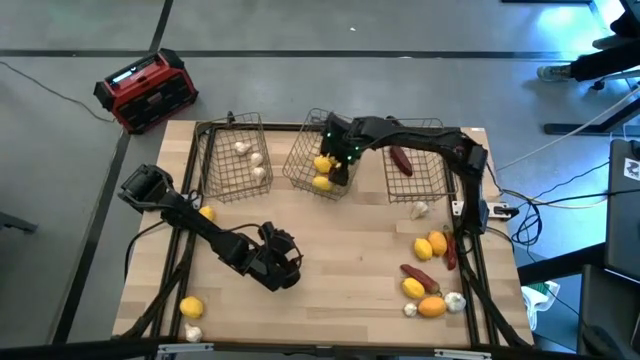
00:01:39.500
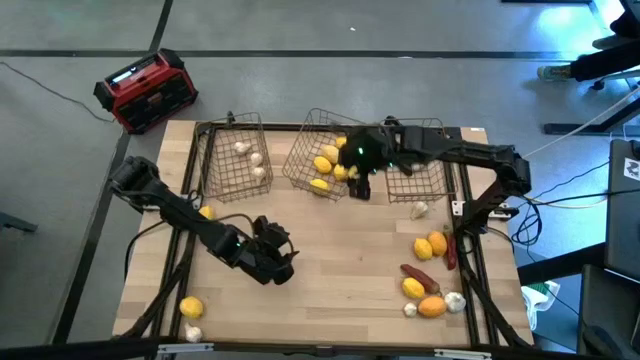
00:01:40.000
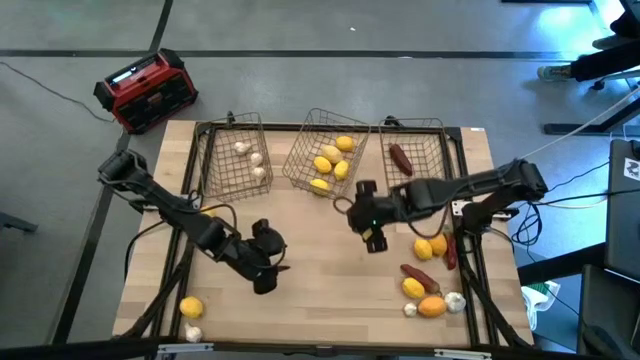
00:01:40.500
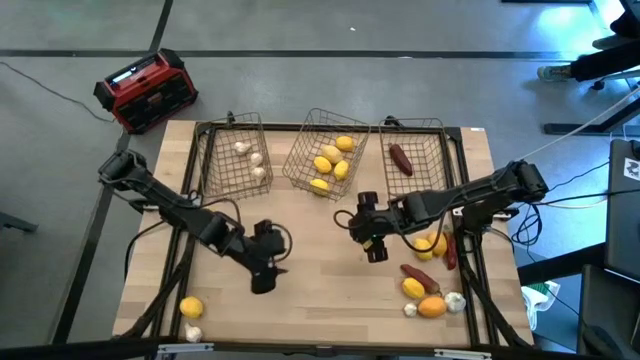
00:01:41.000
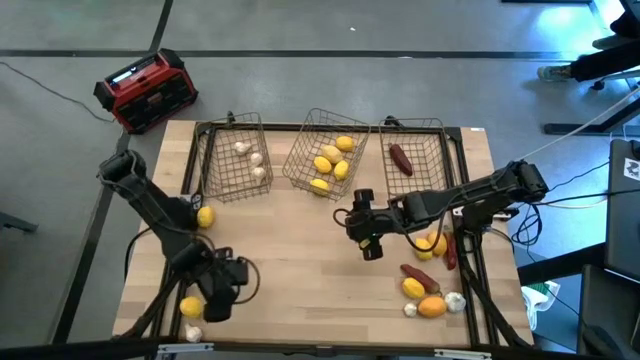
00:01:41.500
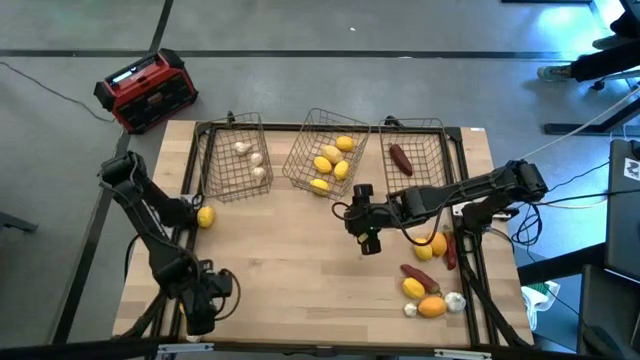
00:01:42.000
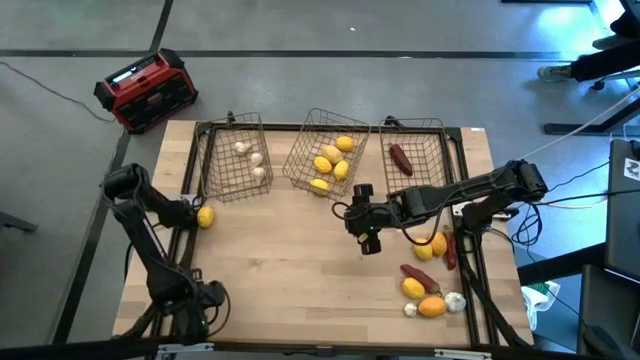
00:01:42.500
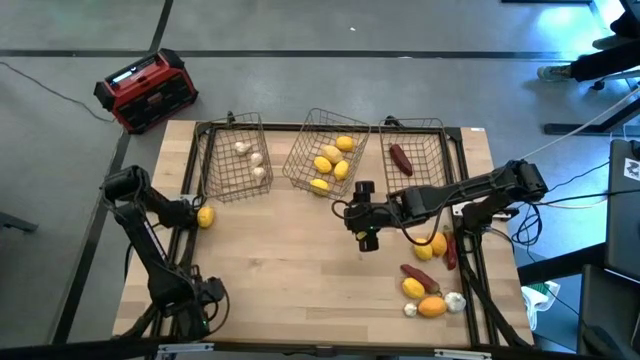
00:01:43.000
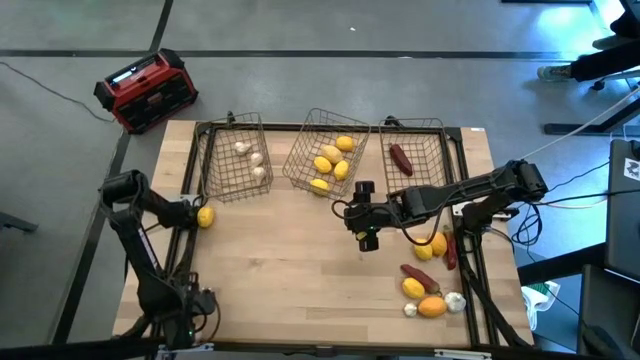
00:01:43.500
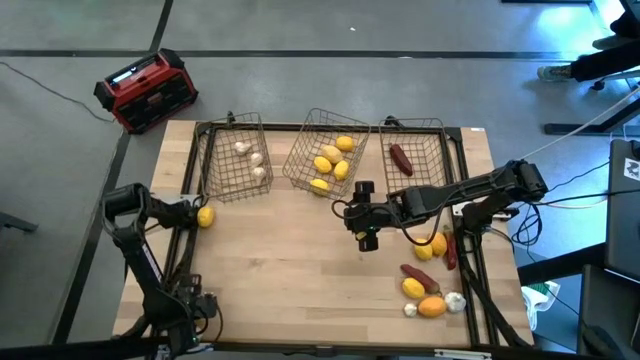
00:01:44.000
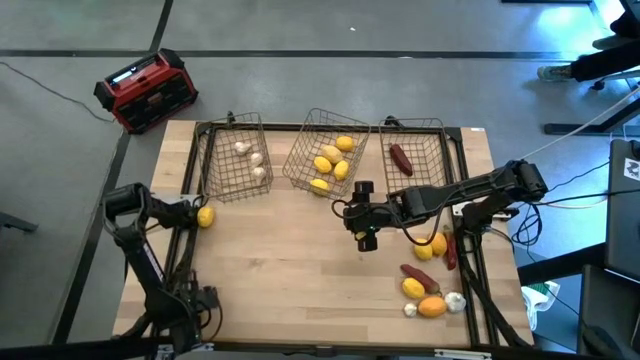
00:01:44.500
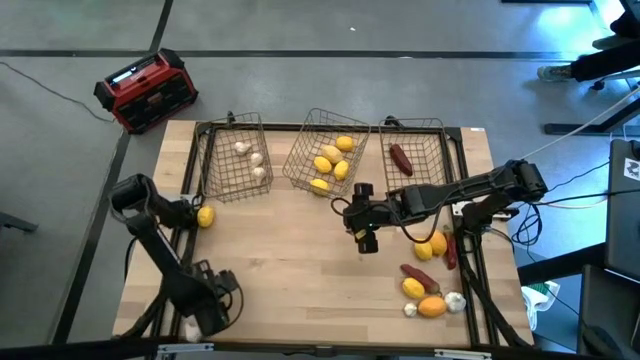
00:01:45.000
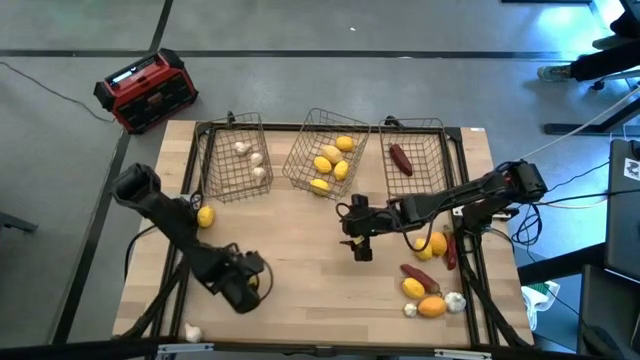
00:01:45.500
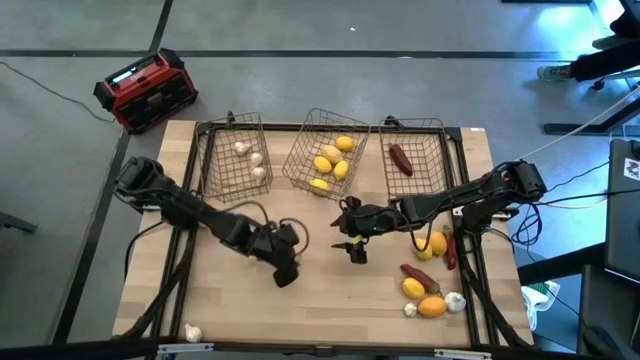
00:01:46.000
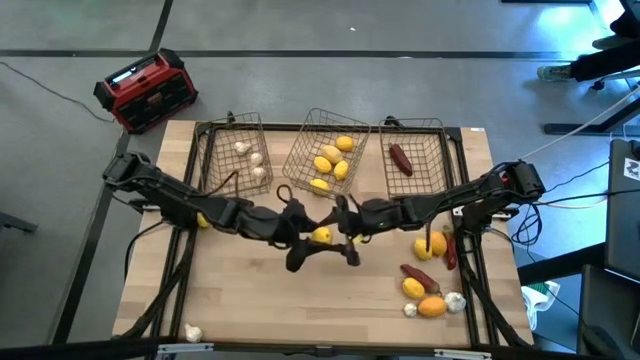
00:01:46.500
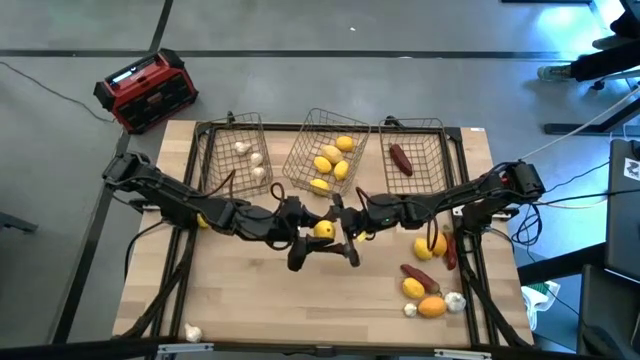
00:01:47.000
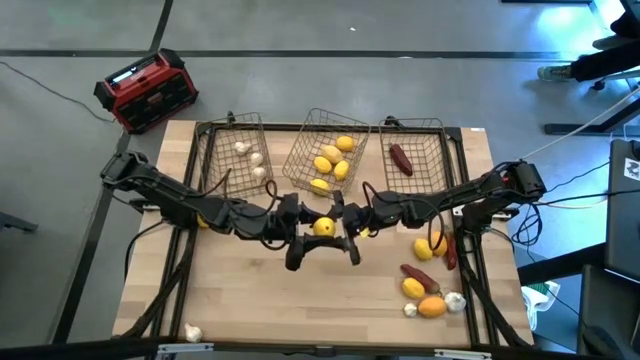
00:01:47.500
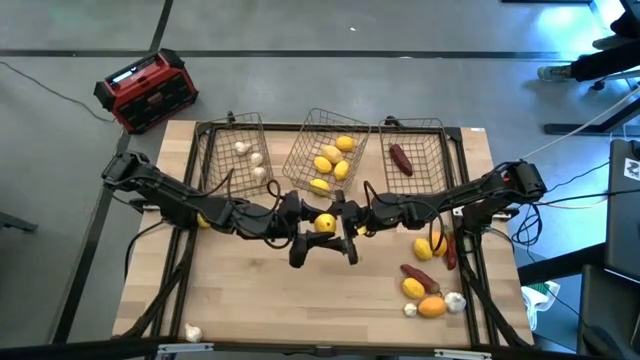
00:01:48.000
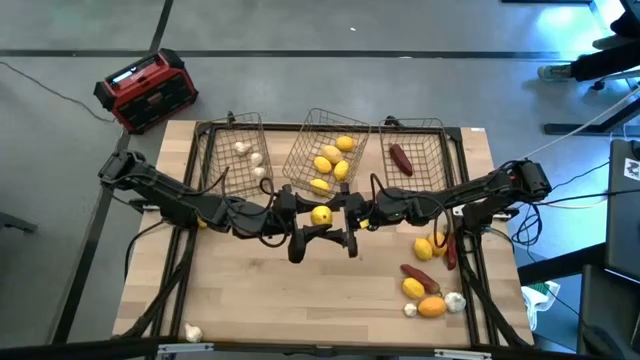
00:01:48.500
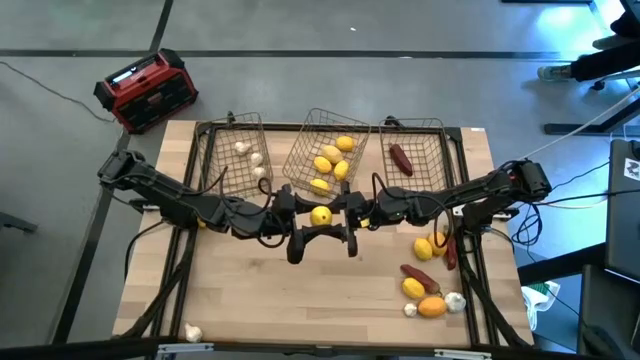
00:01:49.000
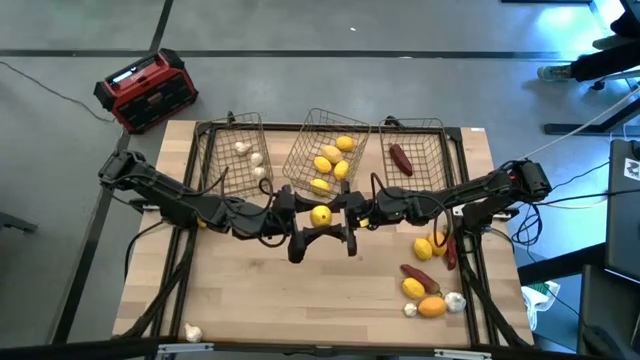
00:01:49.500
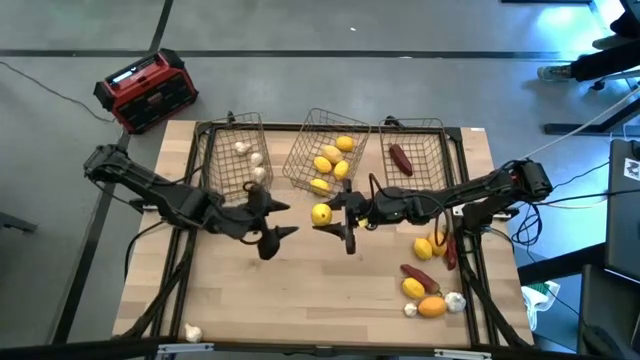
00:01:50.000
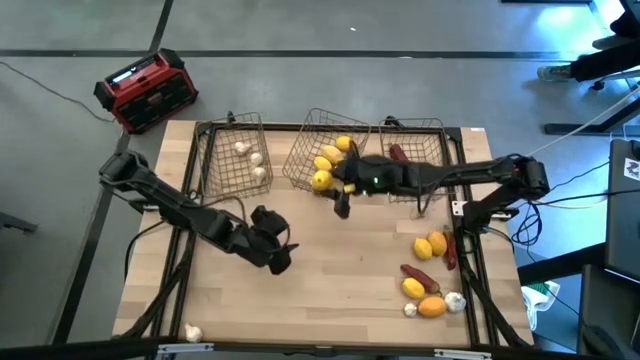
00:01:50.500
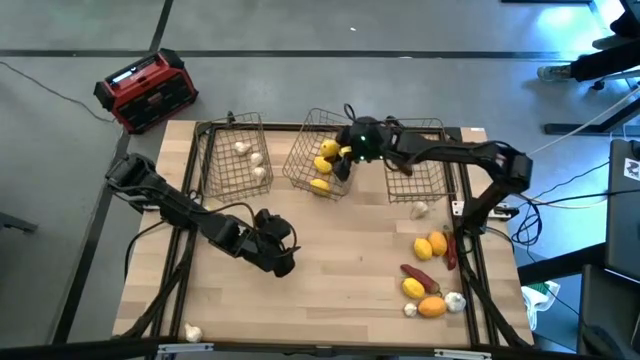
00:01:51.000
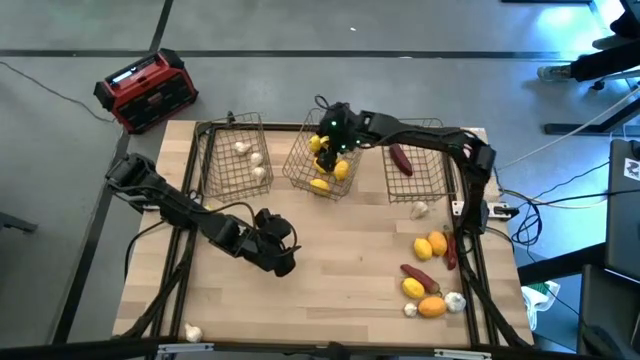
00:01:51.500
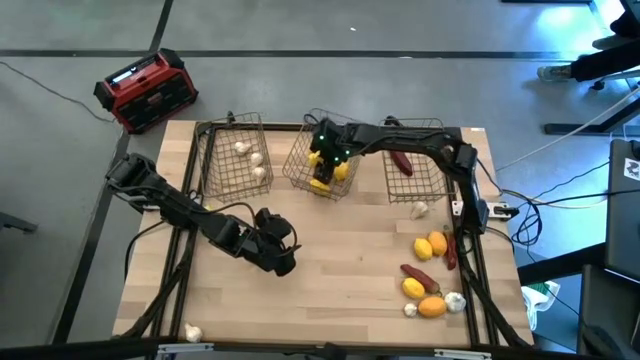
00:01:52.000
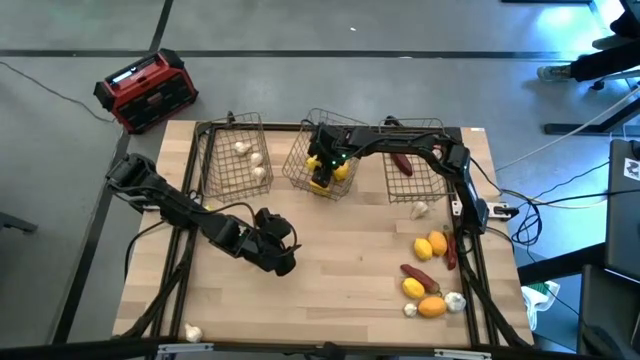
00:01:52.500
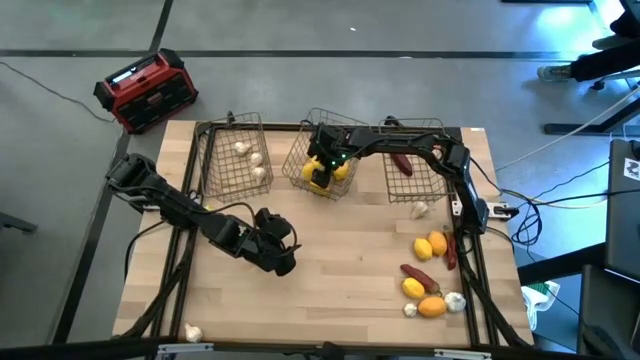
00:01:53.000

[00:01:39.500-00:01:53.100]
Task: Sort produce into baskets
Put the lemon into the middle wire basket

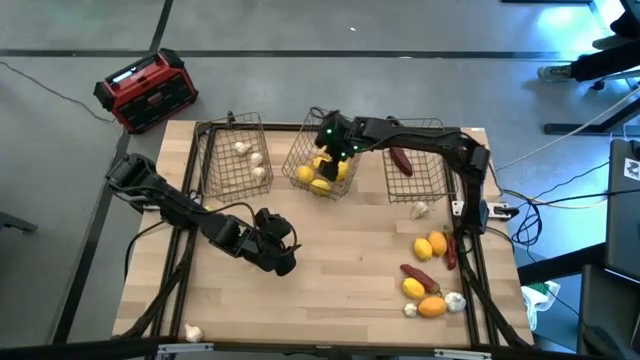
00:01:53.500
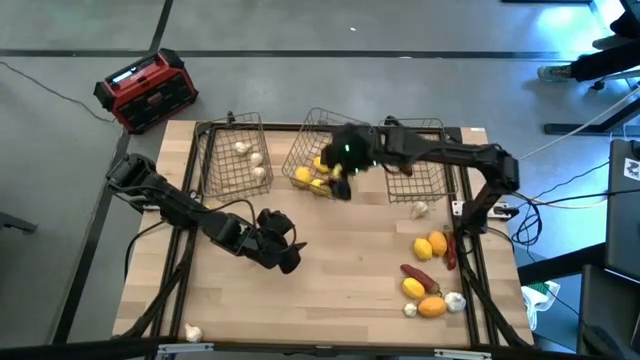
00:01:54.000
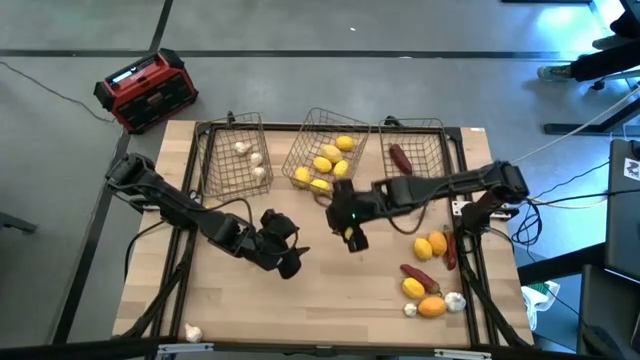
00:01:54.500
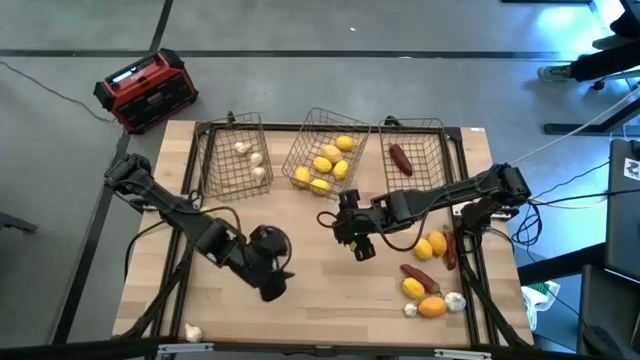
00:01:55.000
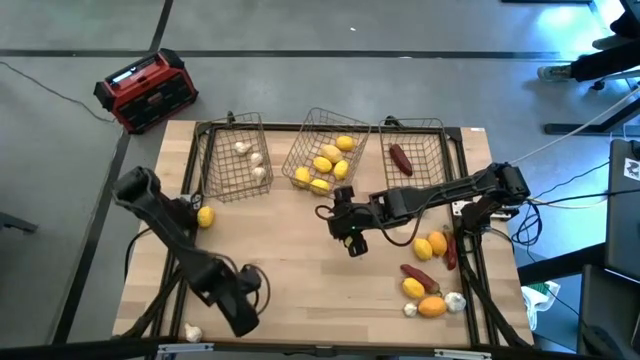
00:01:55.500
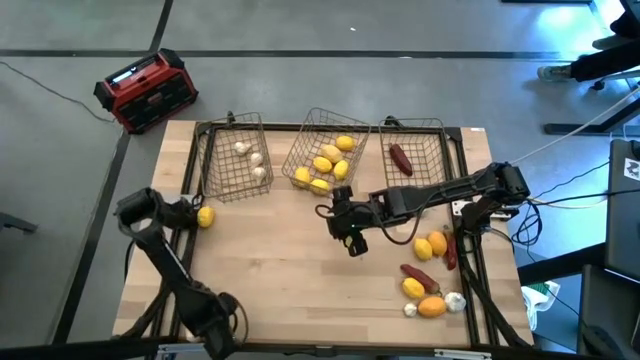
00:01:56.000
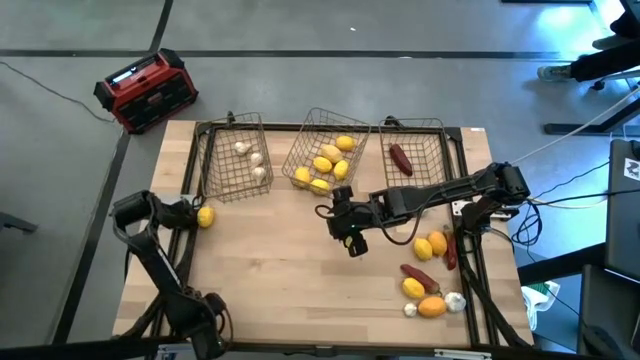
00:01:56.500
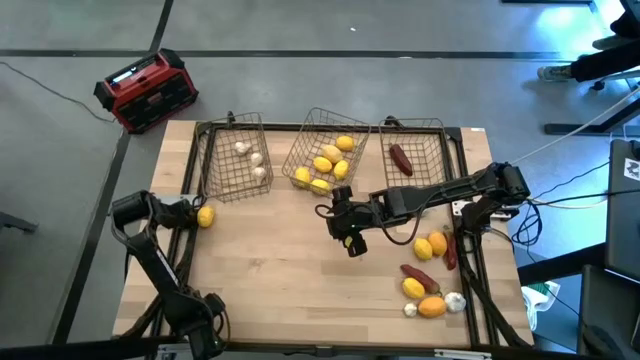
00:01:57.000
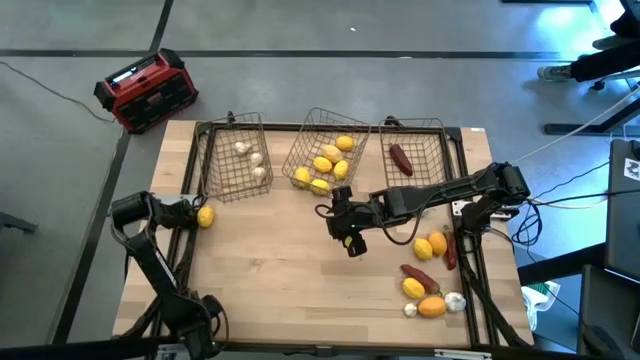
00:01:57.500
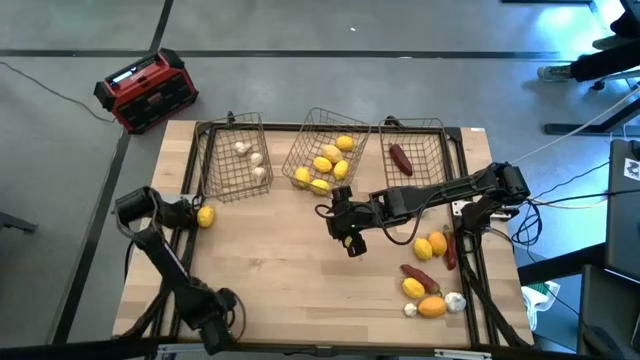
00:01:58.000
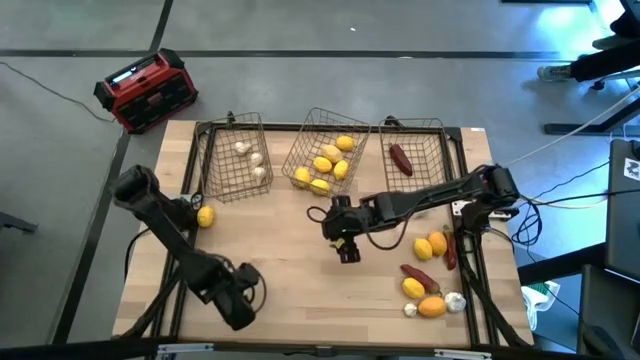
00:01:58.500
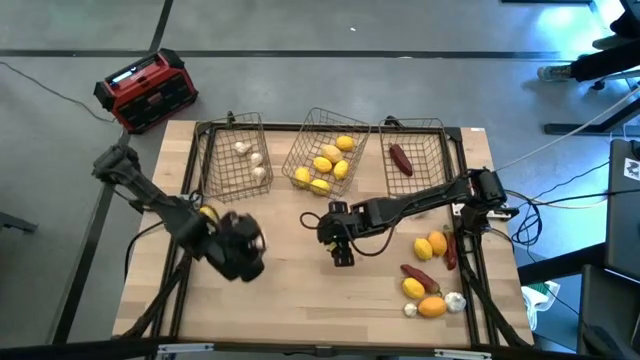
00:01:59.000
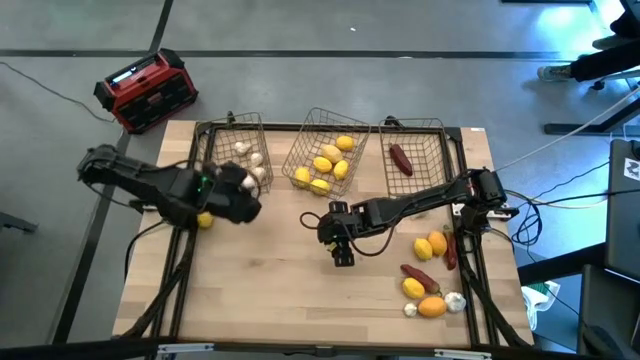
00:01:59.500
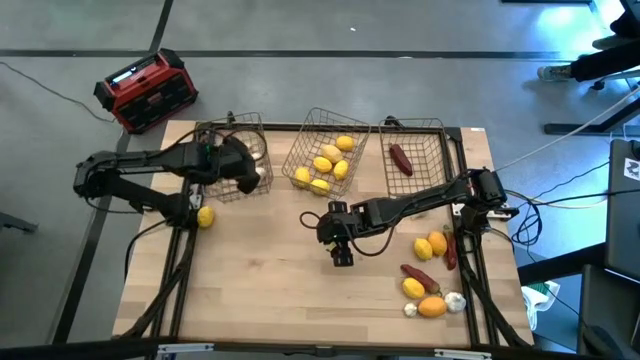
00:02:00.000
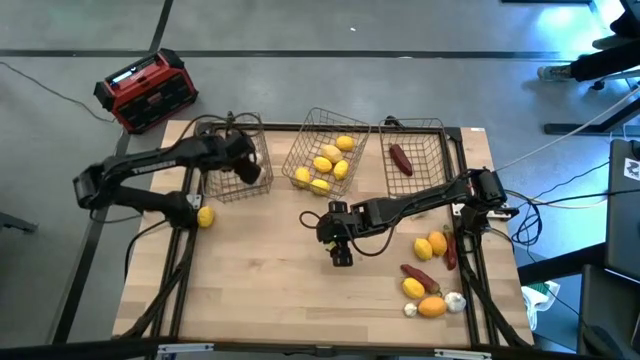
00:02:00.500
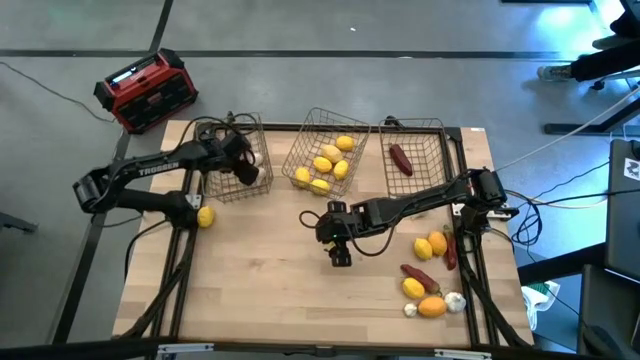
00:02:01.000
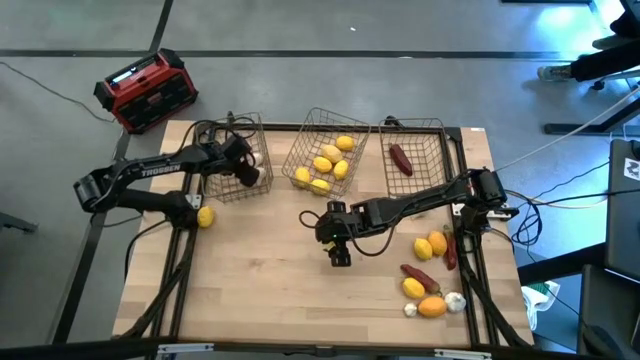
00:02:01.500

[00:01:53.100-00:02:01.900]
Put the garlic into the left wire basket
